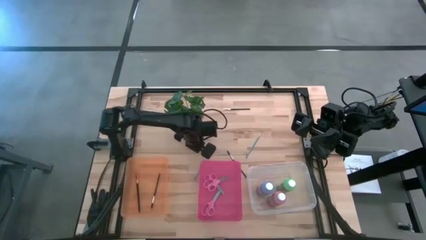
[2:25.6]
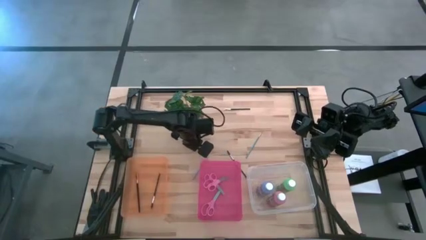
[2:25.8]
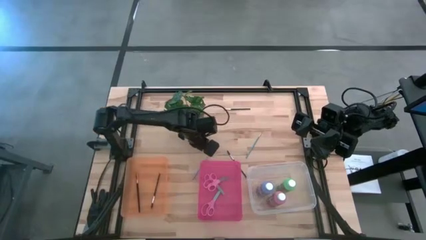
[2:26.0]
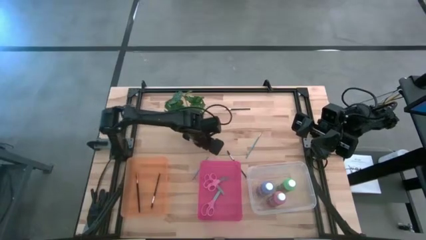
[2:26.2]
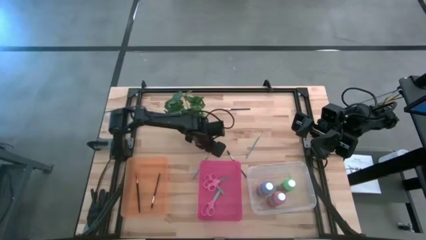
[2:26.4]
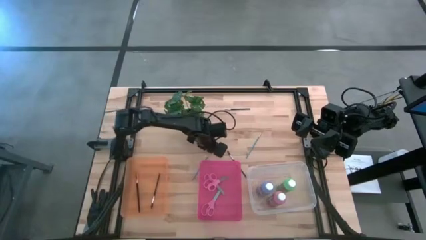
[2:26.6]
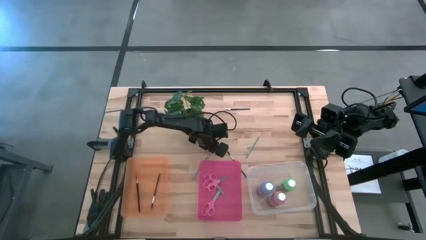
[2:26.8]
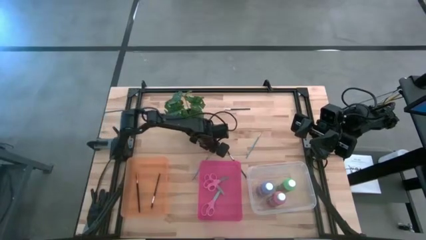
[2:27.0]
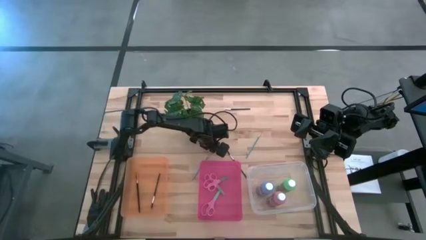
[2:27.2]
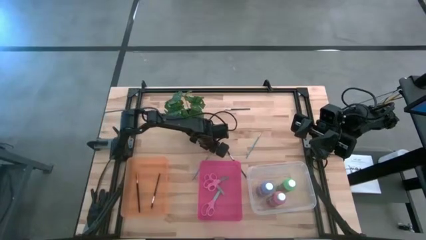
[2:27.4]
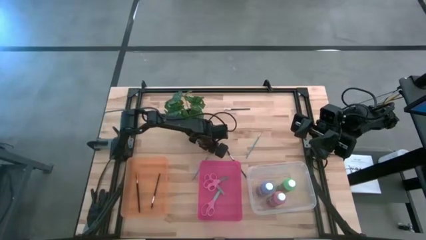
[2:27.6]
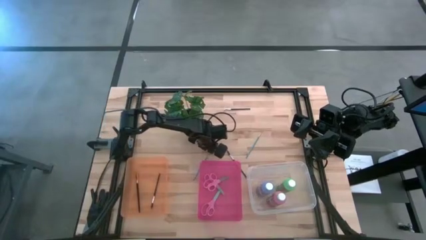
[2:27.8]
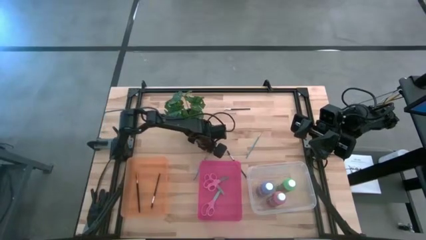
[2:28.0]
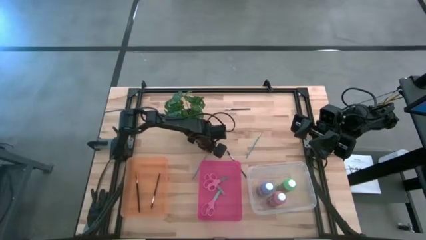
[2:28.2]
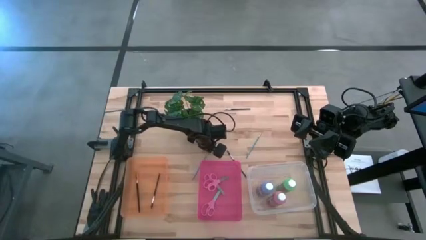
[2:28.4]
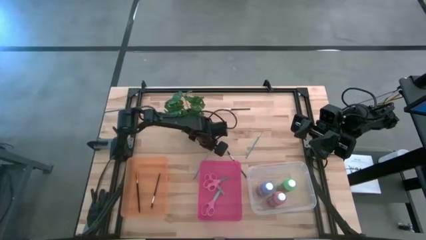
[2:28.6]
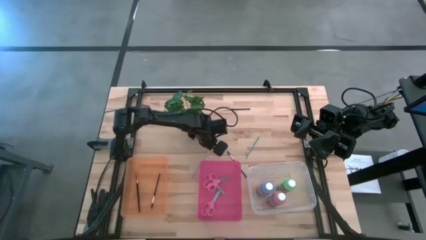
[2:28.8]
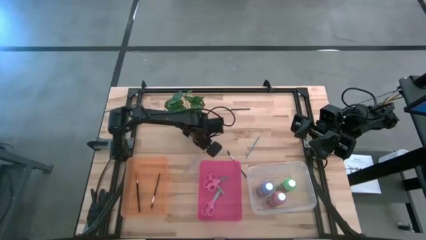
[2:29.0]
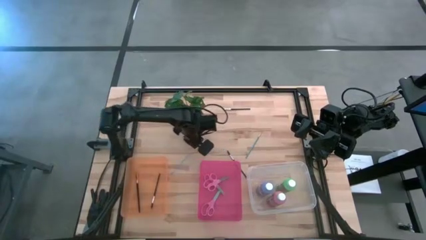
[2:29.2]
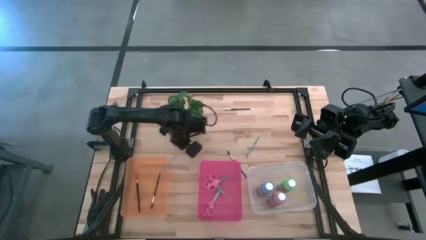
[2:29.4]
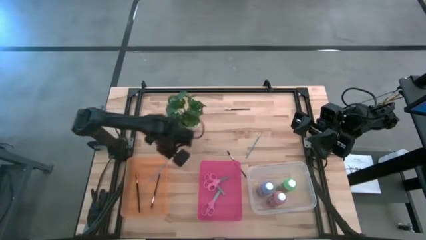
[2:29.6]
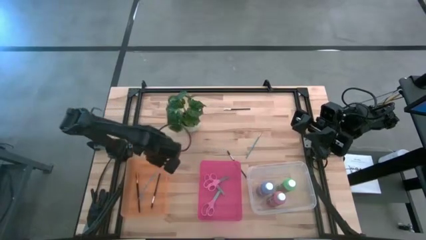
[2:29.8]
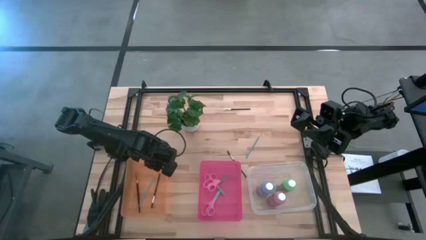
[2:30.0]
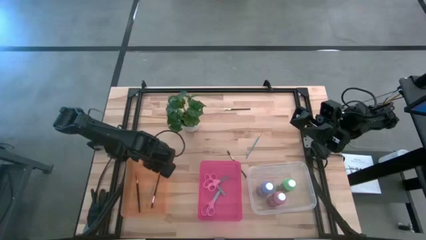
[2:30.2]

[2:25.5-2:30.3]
Task: Pick & Place Paint Supplies
Put the blue paintbrush into the orange bin

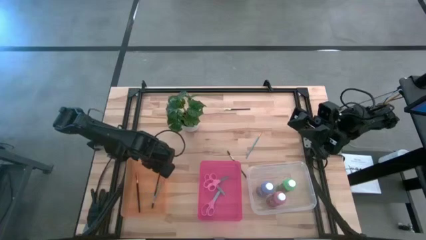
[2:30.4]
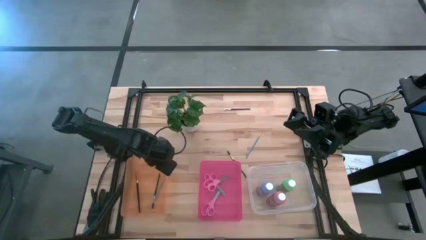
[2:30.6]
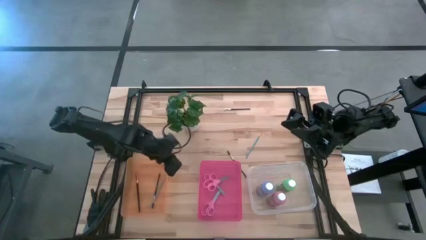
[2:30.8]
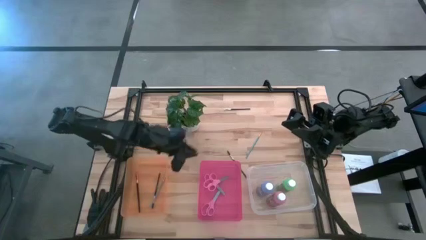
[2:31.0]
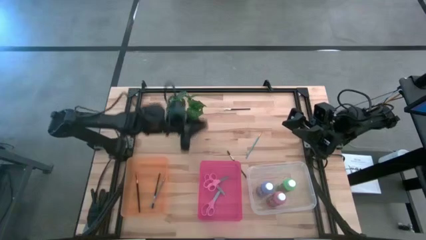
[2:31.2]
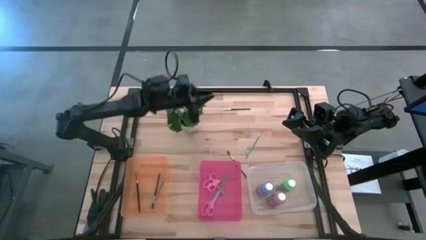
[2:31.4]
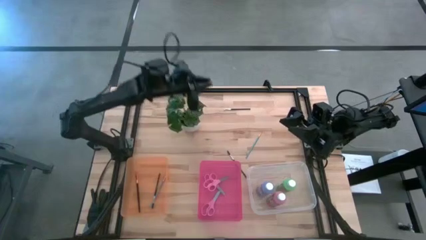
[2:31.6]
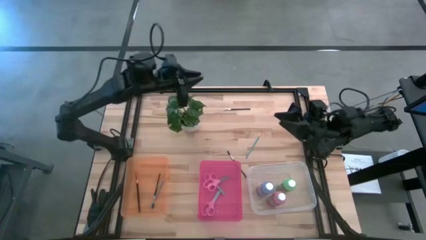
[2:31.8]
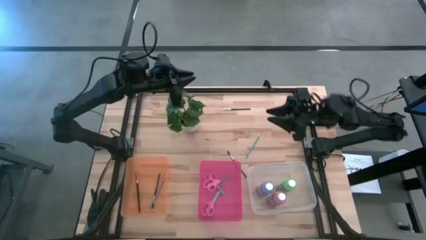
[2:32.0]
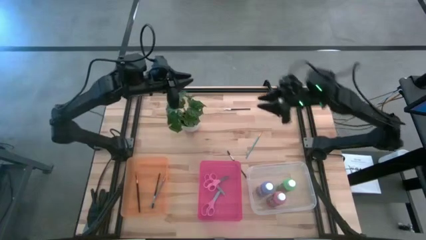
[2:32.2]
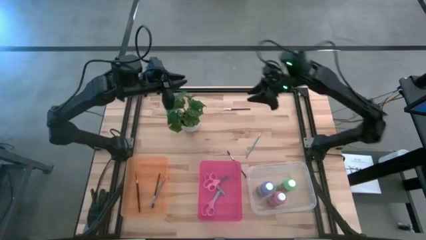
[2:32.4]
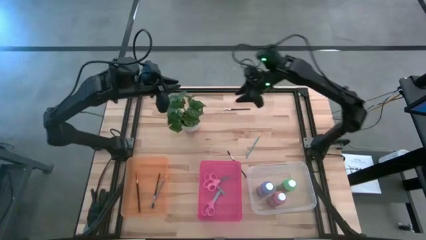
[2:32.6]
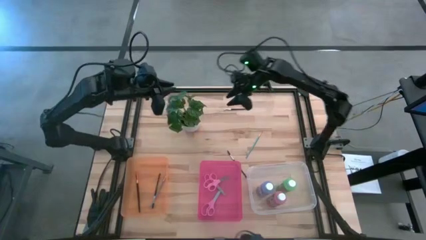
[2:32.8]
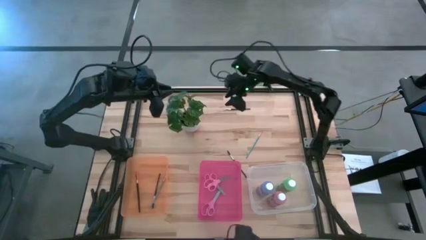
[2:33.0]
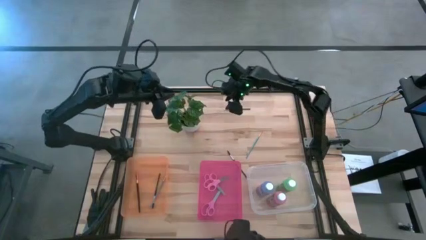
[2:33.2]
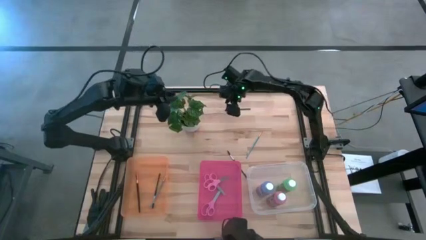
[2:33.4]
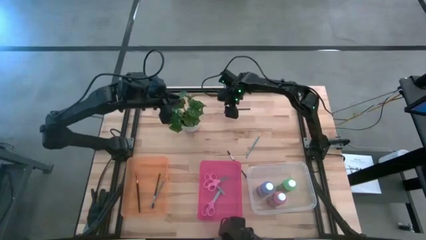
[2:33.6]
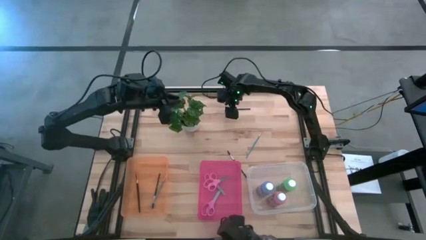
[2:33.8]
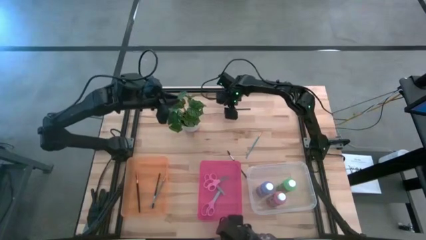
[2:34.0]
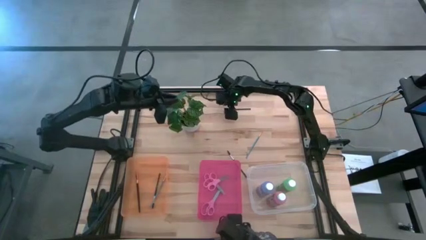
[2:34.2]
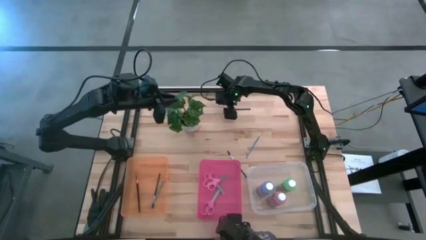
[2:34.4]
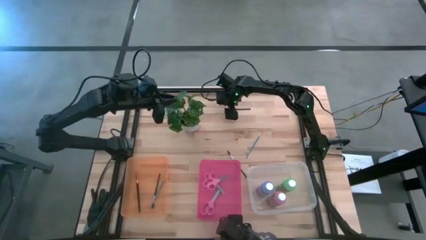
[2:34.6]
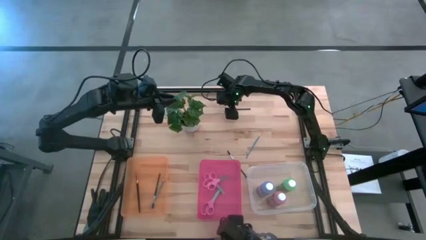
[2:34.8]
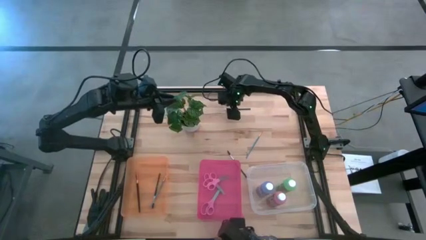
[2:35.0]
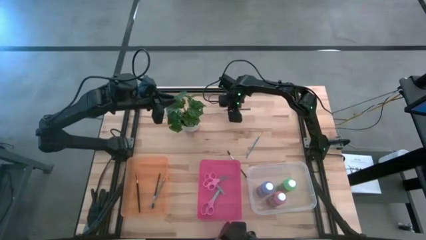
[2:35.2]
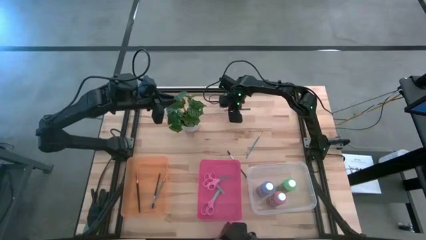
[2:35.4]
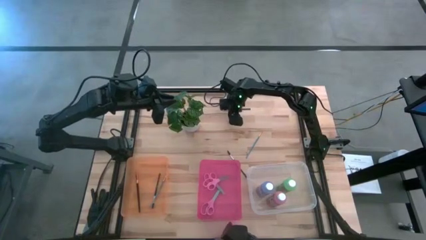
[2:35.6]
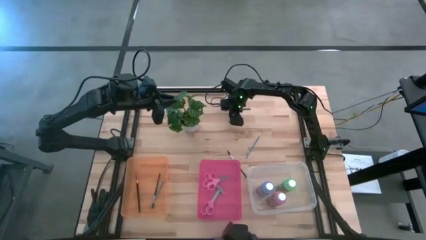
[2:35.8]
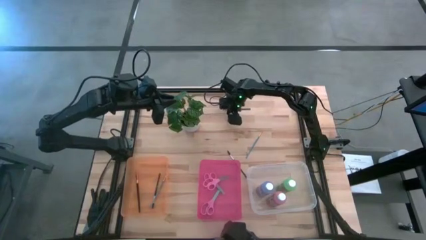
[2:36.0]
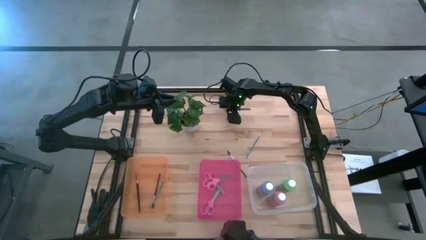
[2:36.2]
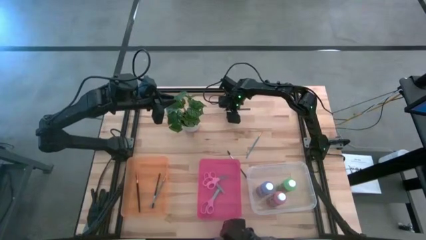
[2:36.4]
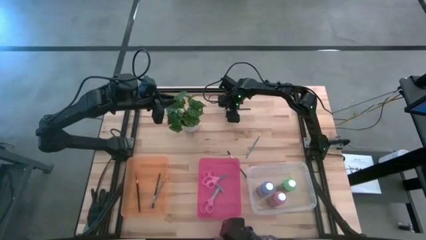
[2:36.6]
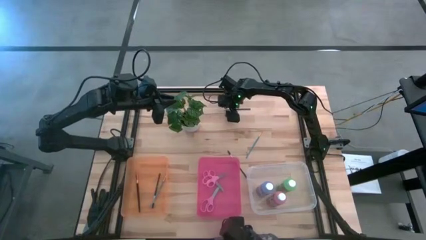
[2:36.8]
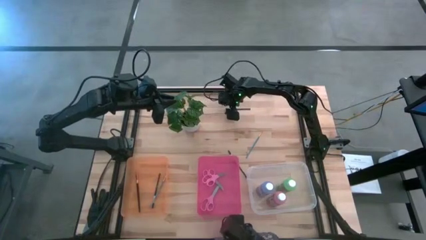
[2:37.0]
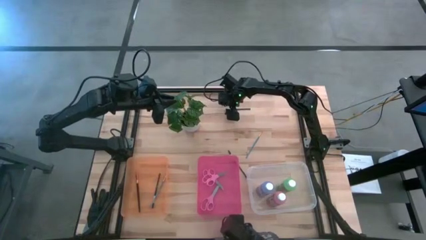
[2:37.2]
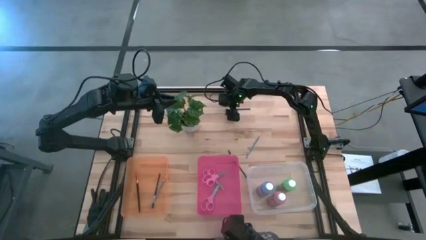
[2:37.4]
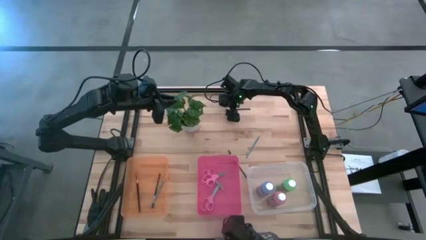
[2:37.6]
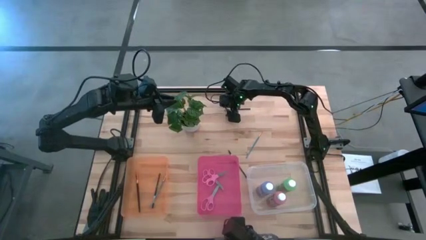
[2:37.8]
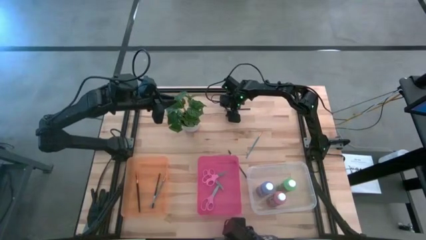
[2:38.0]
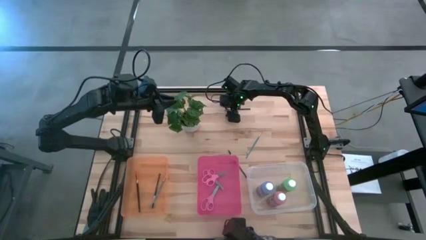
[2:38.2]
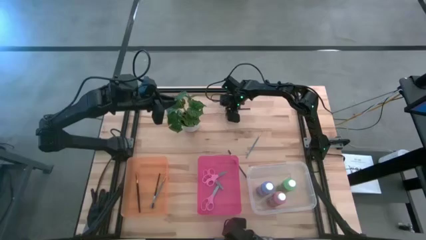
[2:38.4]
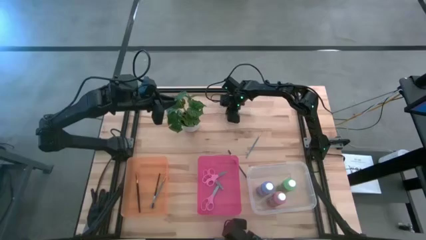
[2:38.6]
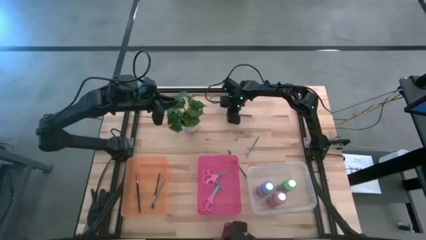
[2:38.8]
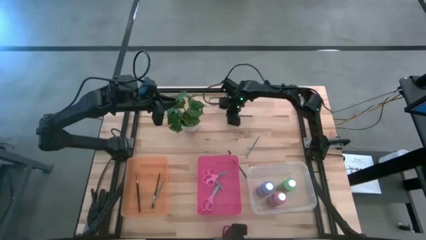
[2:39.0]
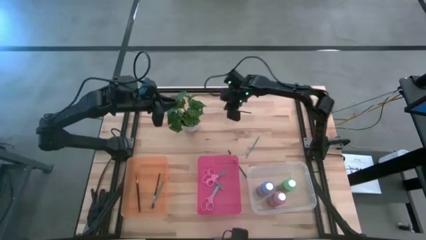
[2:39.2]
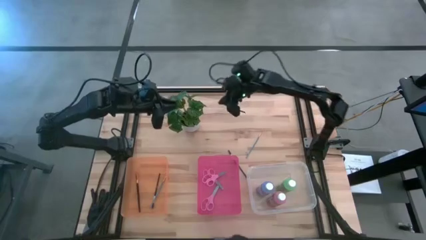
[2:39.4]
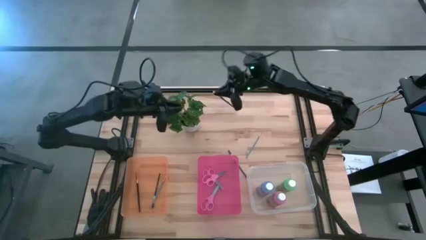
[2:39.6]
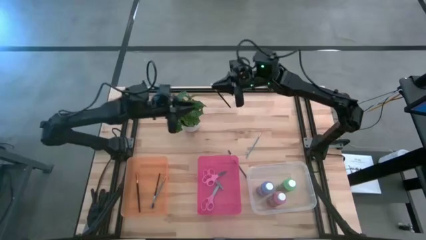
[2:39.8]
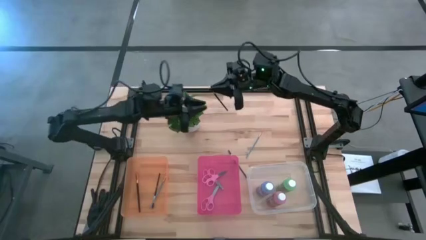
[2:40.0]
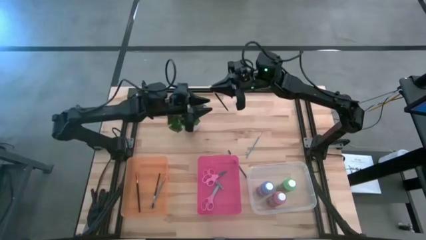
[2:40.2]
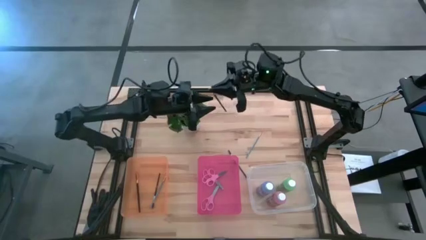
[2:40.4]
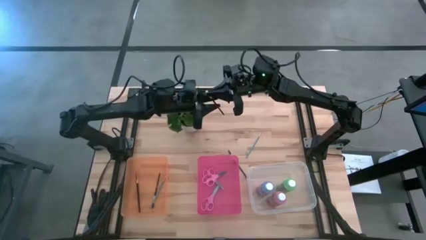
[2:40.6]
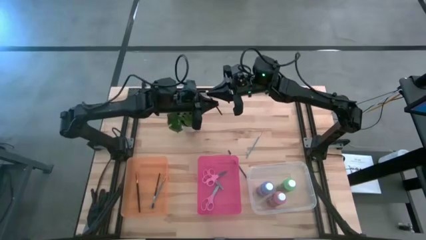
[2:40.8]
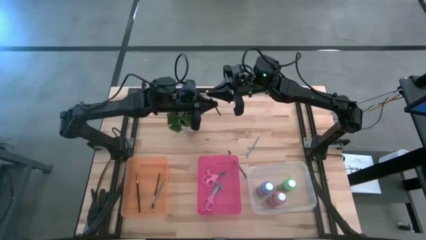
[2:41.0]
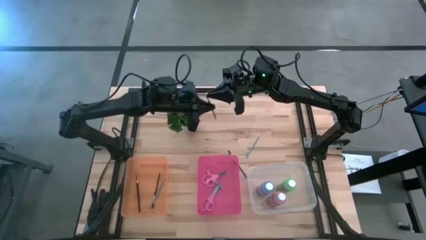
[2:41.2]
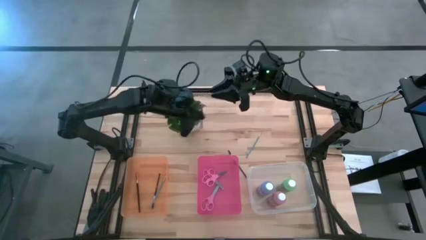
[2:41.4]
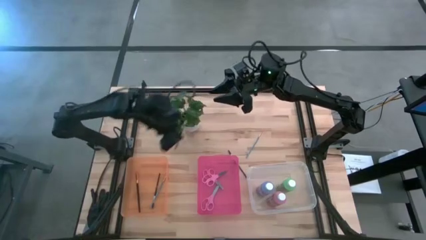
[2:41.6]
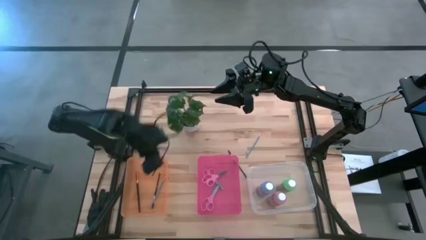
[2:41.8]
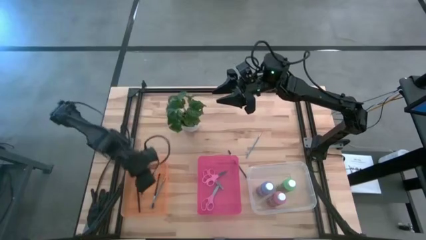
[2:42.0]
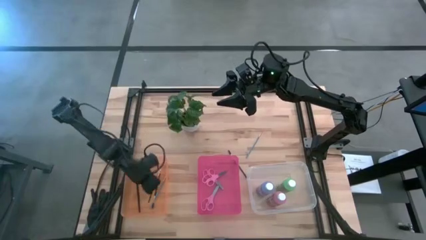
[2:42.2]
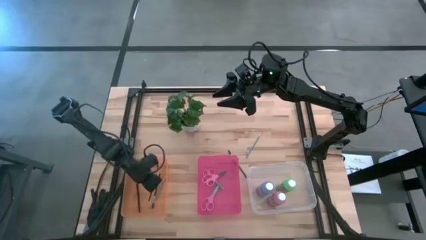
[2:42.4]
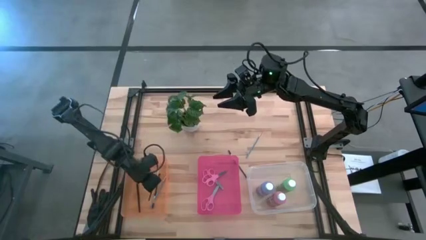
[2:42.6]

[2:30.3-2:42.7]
Put the black eyeshadow brush into the orange bin
